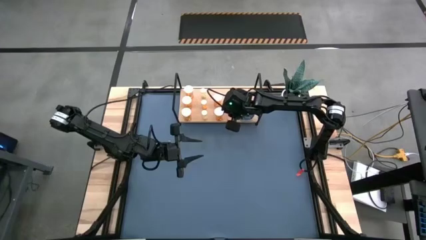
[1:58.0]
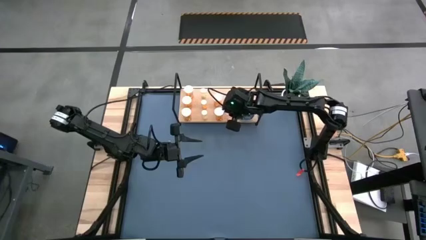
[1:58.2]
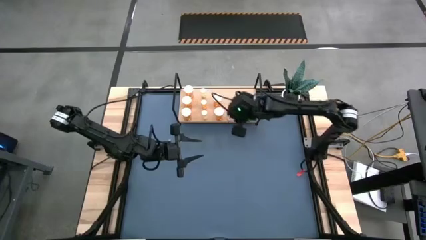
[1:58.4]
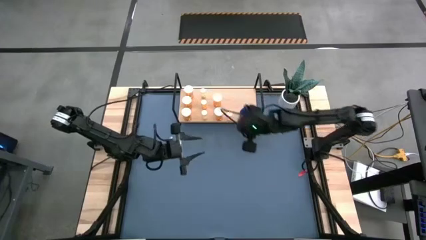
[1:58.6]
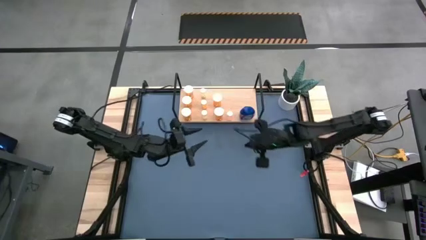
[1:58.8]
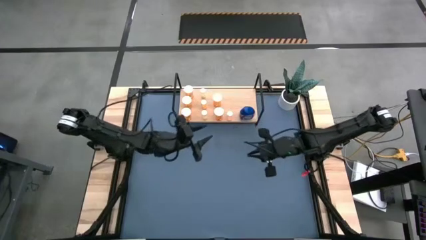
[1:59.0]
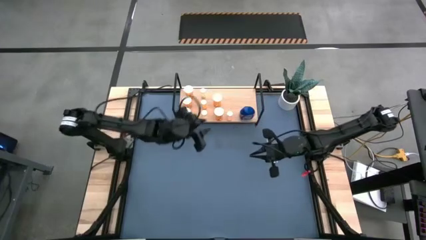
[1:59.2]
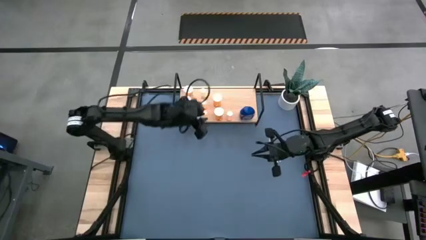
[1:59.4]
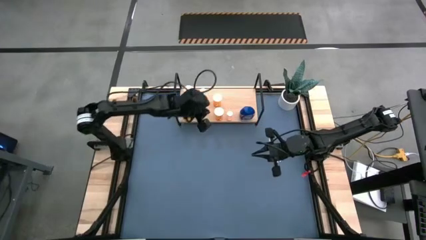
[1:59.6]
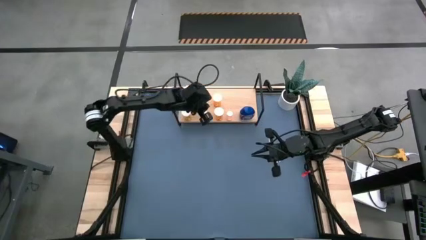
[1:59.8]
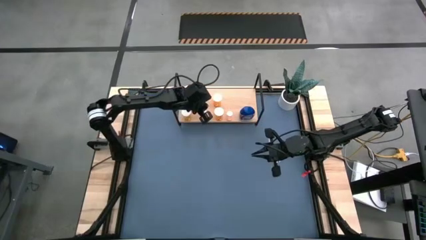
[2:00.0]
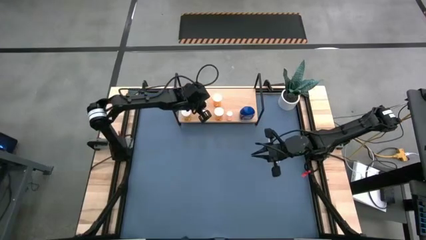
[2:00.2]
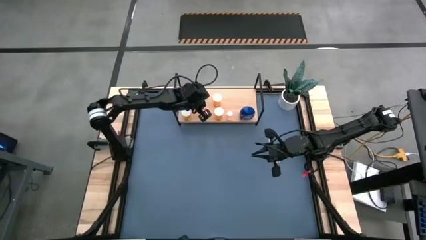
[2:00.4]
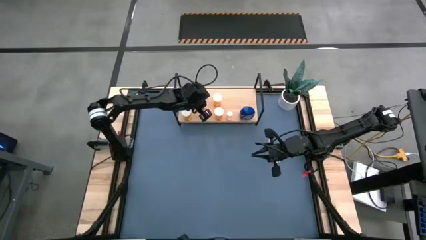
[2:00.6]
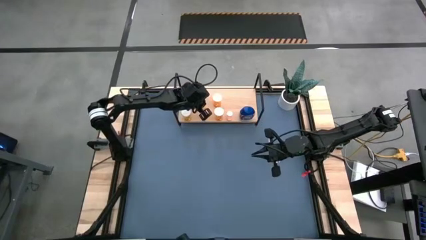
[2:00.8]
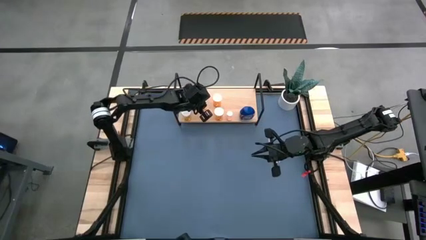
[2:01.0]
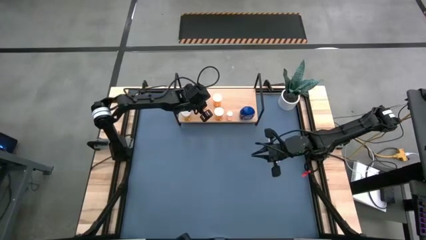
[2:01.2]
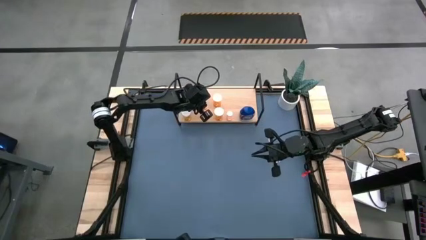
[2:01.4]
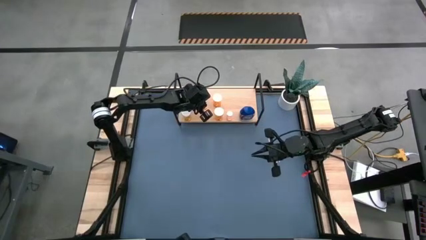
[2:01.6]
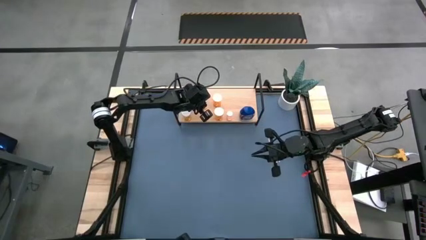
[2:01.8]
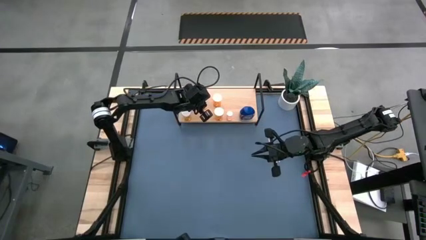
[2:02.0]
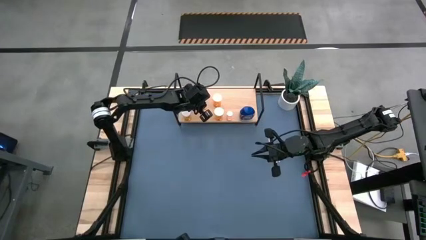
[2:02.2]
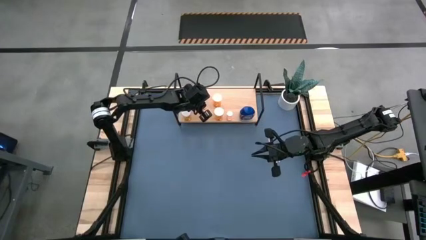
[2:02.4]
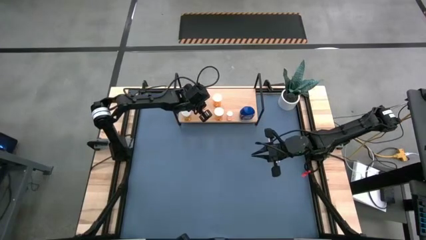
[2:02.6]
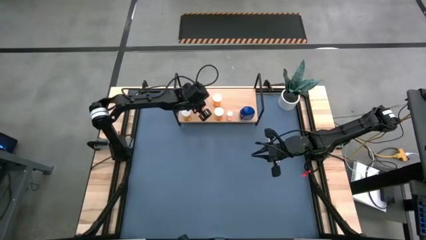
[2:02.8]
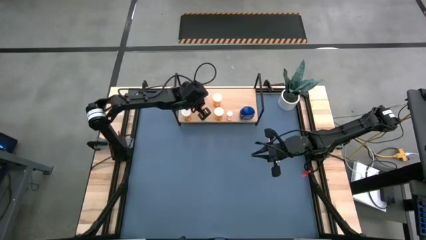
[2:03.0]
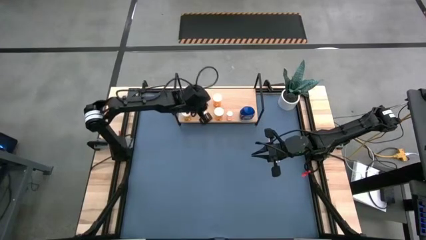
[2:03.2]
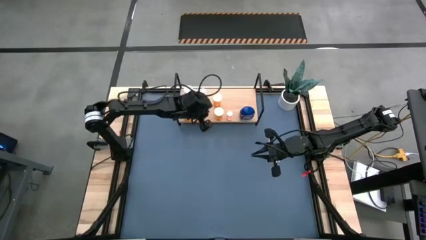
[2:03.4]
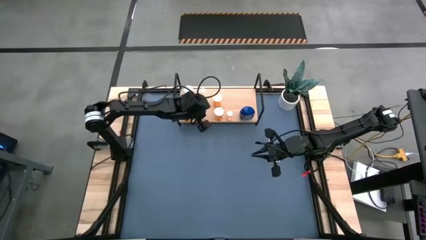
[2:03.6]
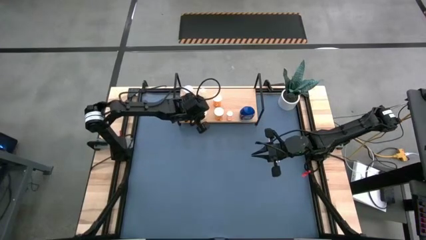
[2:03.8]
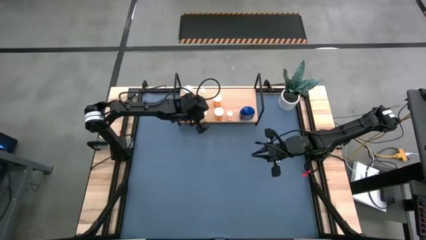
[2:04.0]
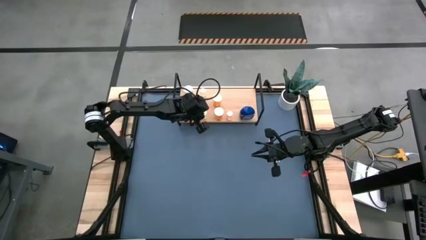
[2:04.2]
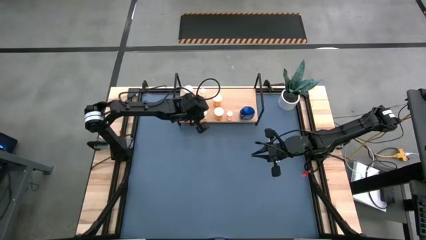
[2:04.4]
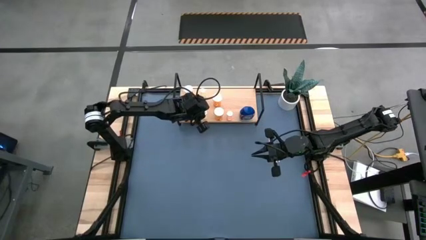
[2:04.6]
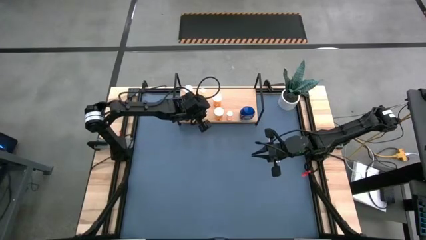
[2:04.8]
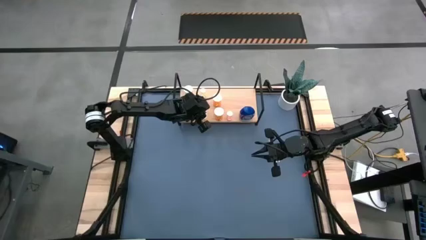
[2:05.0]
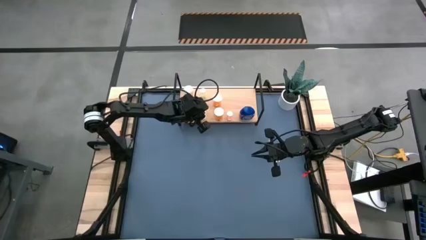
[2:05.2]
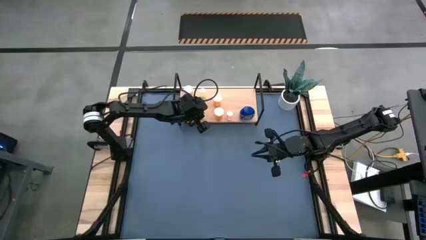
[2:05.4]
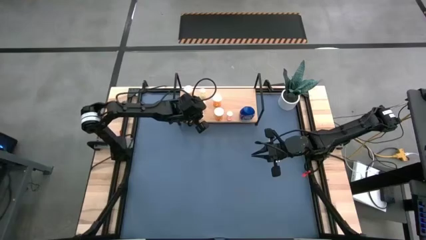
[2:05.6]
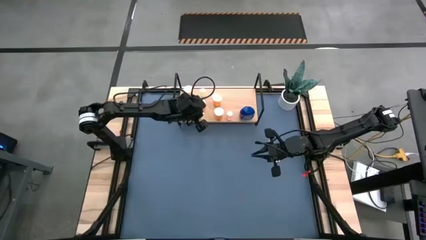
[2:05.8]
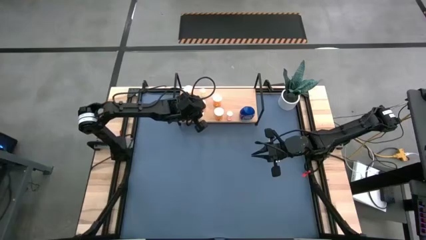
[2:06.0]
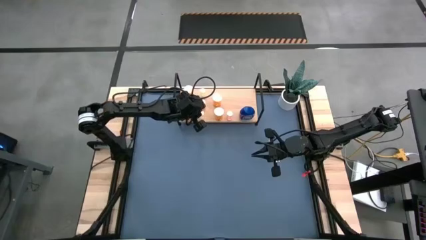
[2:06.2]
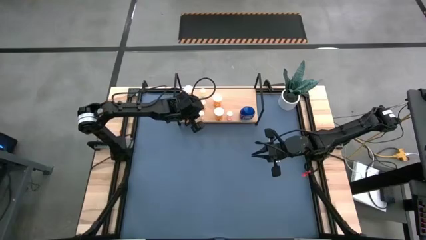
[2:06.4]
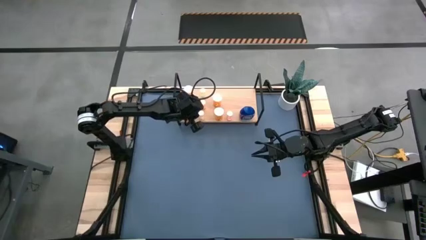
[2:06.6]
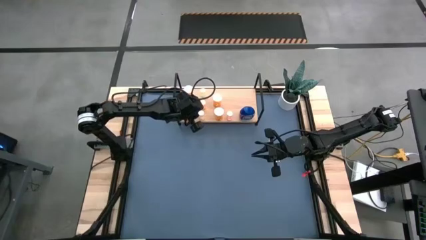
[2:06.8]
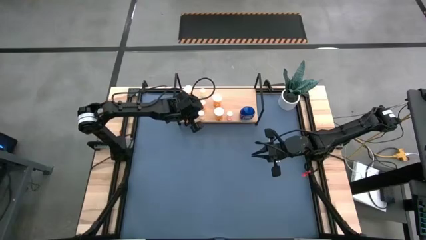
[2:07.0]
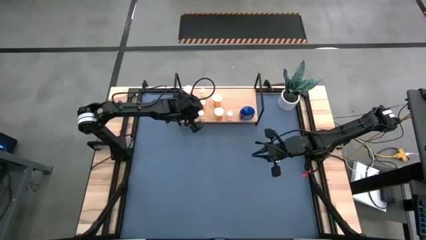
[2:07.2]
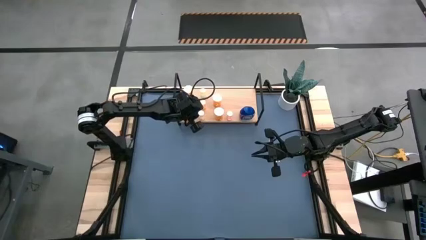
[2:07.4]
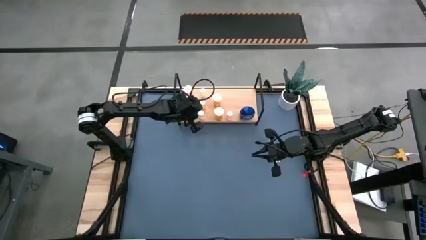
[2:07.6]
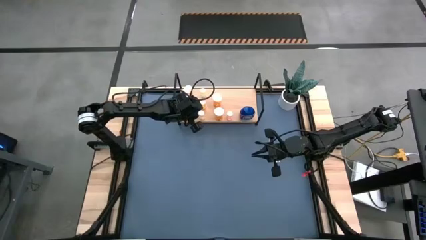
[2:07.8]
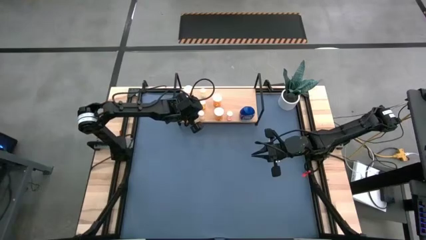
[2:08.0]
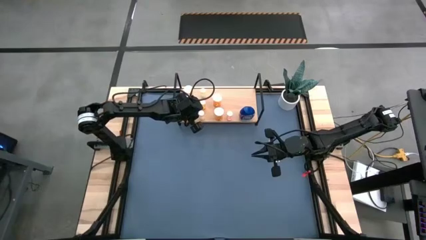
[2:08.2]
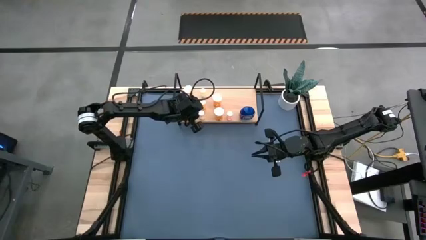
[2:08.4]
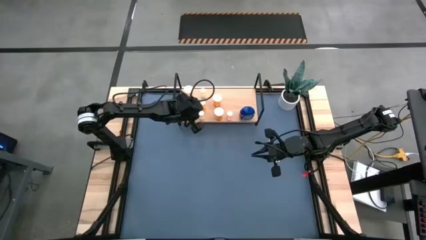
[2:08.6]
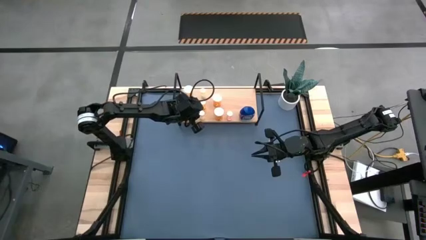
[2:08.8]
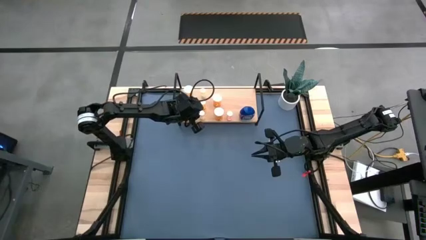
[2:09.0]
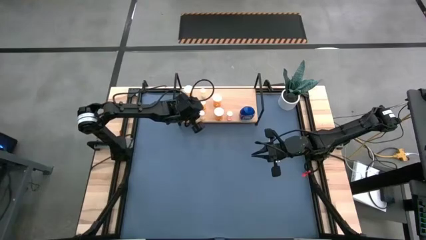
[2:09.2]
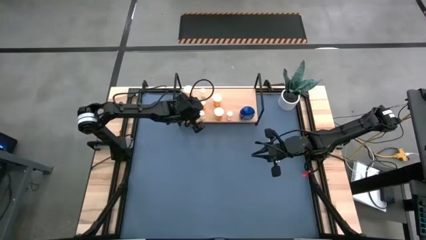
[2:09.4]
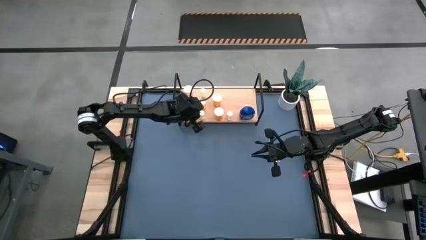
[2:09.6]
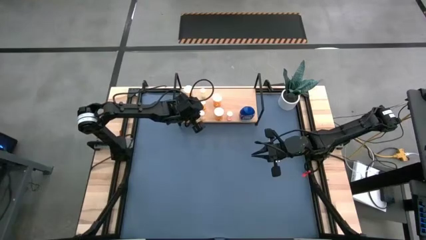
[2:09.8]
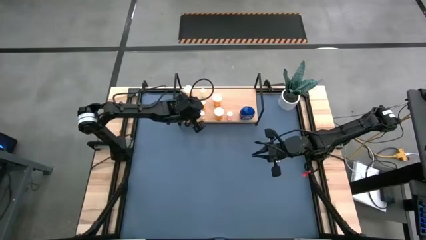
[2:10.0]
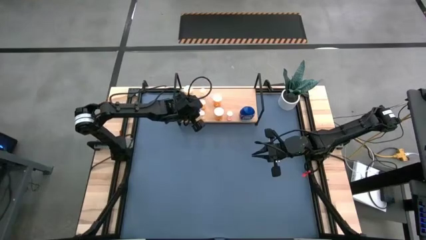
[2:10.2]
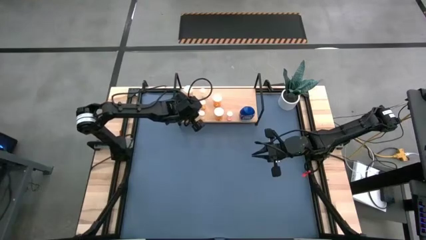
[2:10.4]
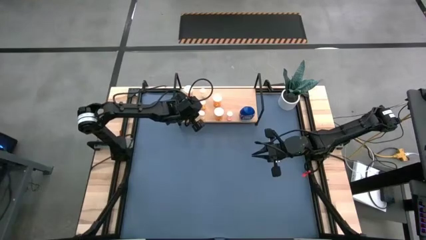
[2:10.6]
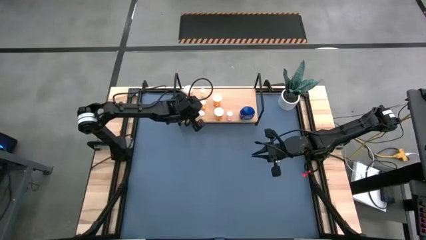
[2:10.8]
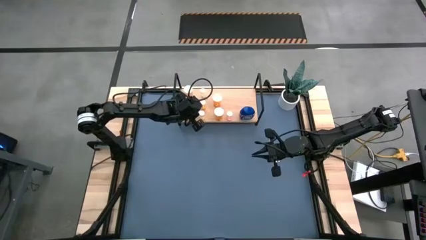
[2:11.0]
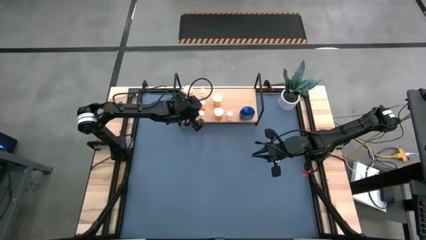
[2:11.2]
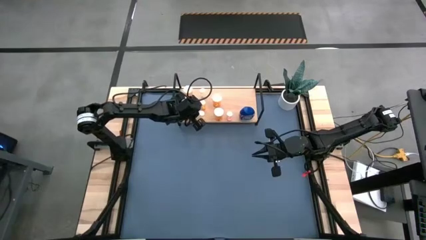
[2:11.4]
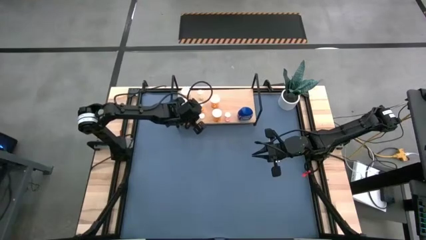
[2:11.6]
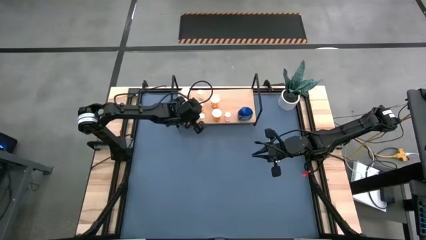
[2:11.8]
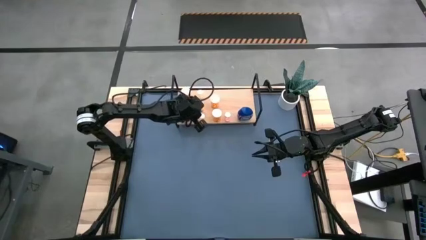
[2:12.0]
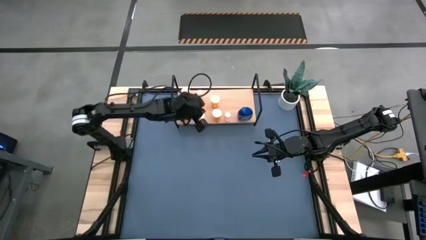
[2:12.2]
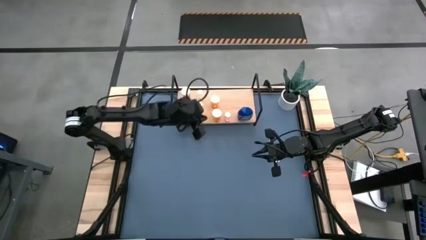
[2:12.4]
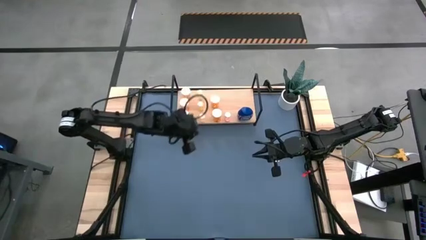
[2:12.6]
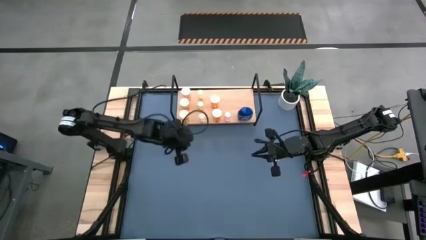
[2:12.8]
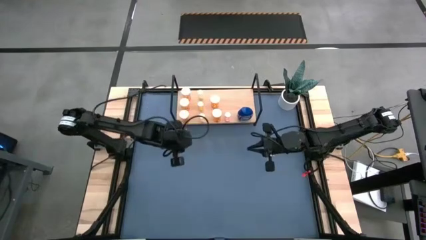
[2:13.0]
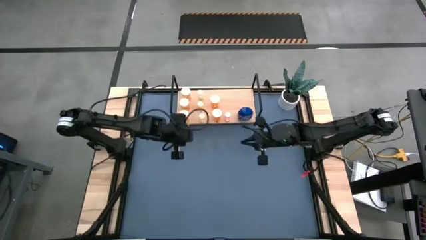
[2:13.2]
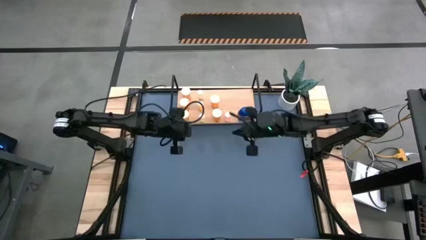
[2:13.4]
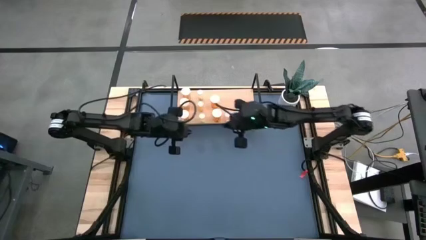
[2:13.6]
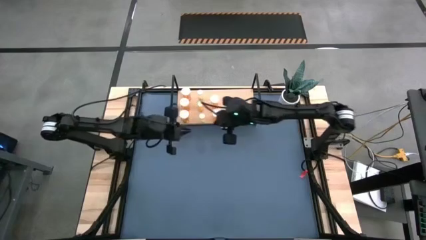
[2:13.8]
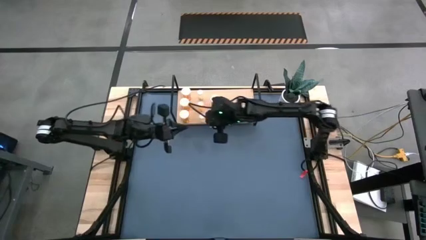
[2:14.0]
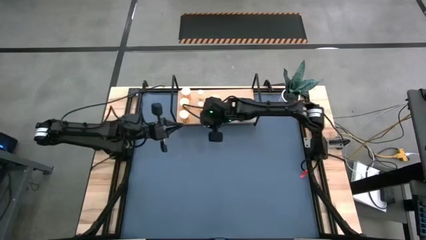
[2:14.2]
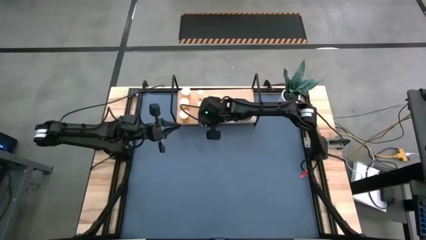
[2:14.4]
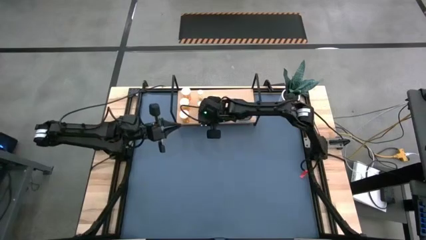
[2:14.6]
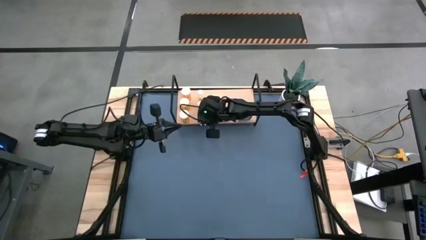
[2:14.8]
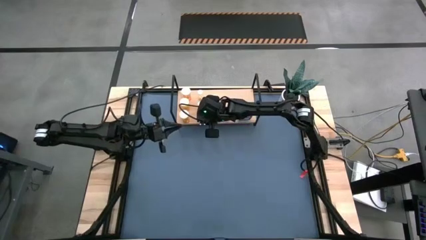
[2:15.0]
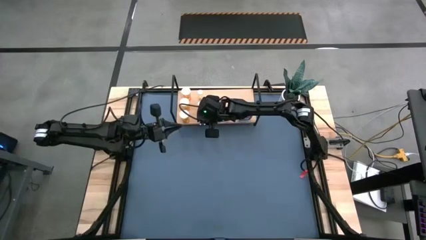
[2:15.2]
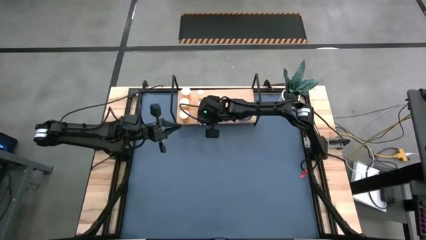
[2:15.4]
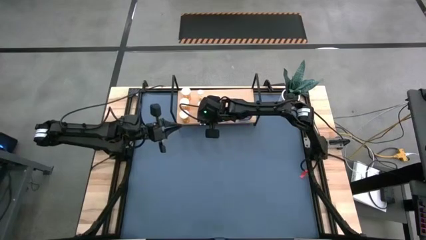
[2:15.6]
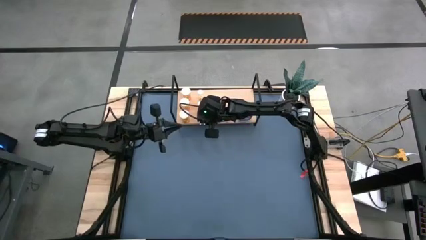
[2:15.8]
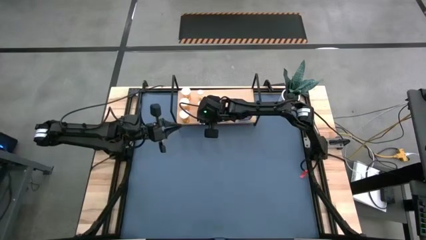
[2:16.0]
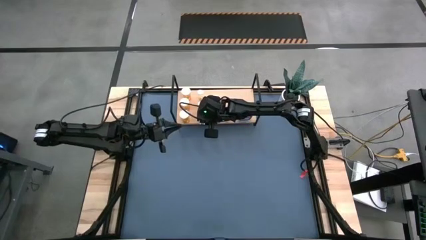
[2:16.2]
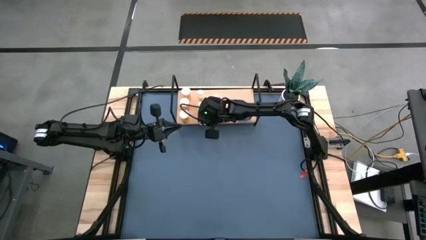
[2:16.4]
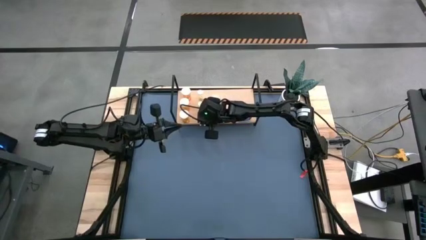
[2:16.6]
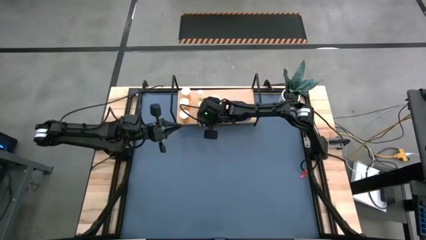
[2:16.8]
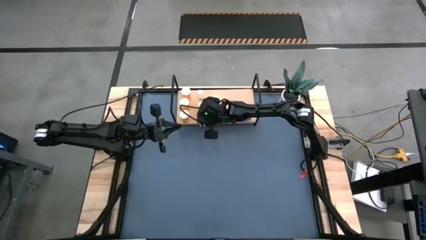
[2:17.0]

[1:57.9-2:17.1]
Task: Pick and place medicine bottles onto shelf by color
Adjust the pill bottles on the shelf
